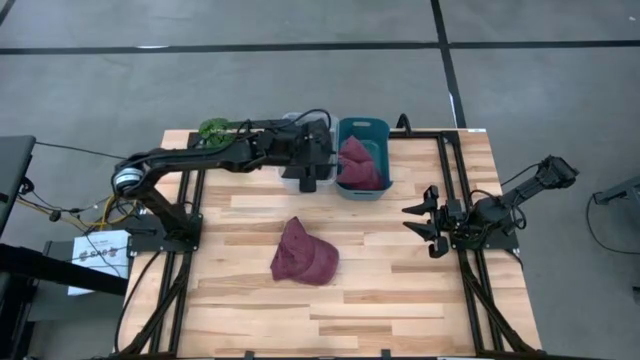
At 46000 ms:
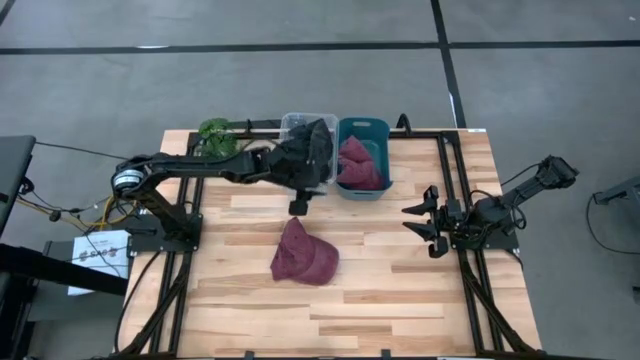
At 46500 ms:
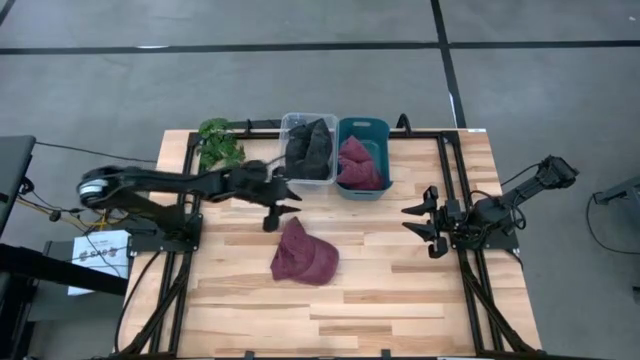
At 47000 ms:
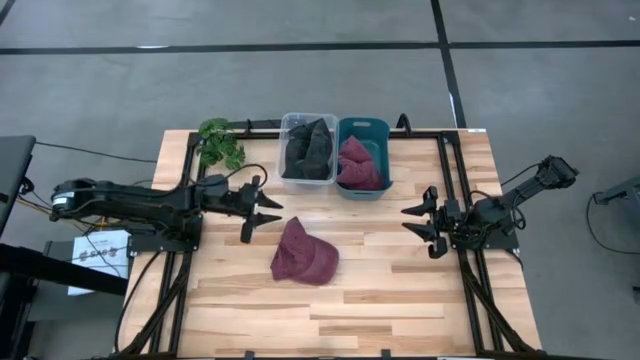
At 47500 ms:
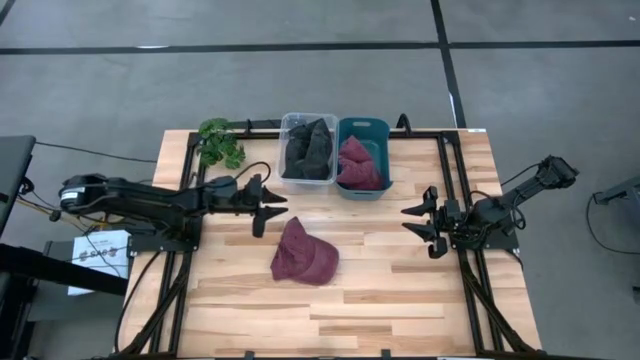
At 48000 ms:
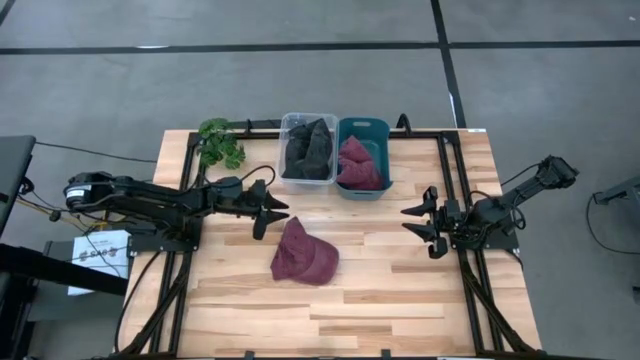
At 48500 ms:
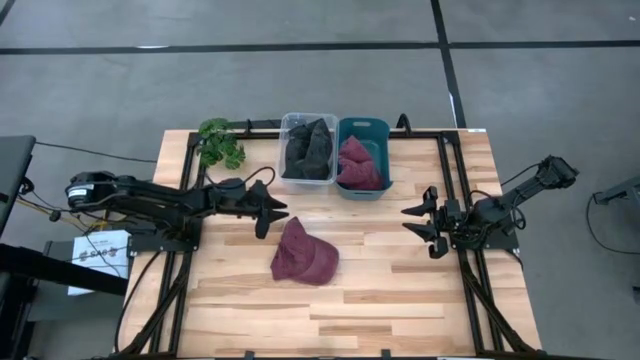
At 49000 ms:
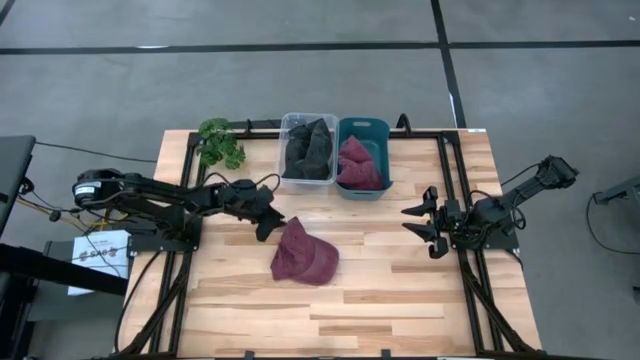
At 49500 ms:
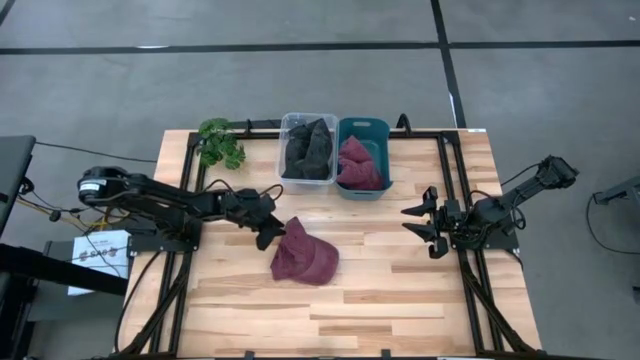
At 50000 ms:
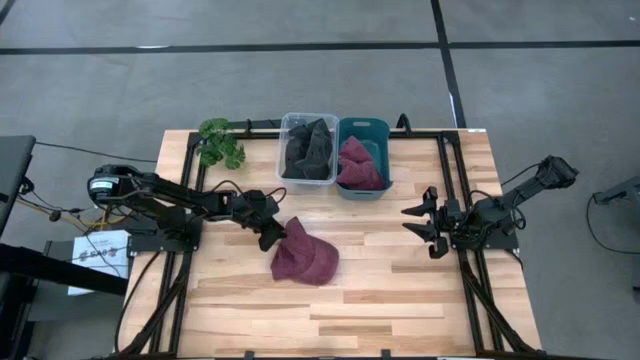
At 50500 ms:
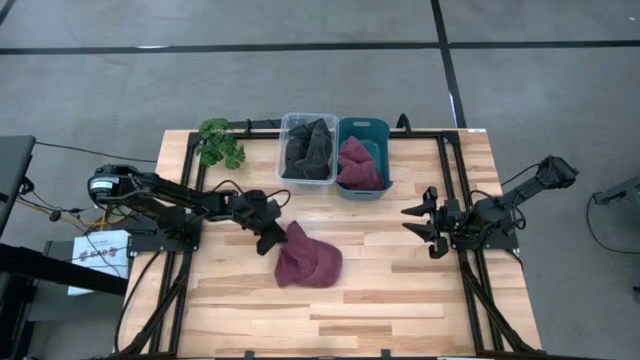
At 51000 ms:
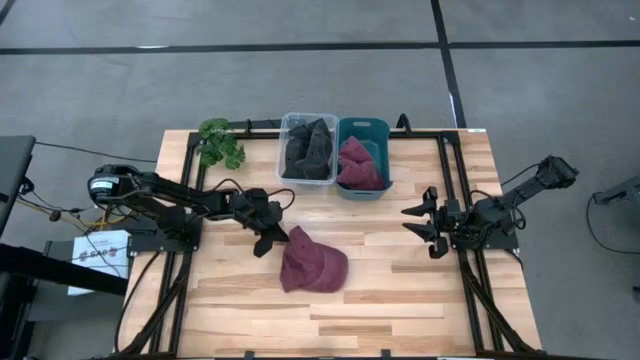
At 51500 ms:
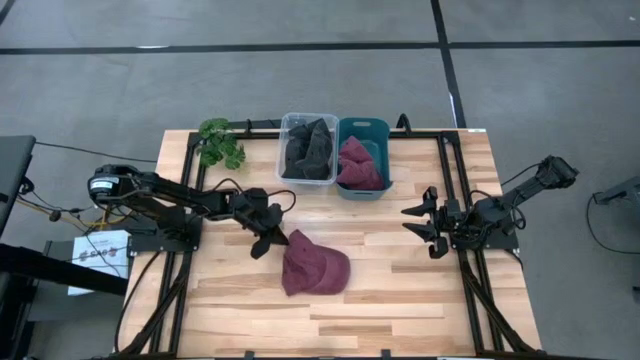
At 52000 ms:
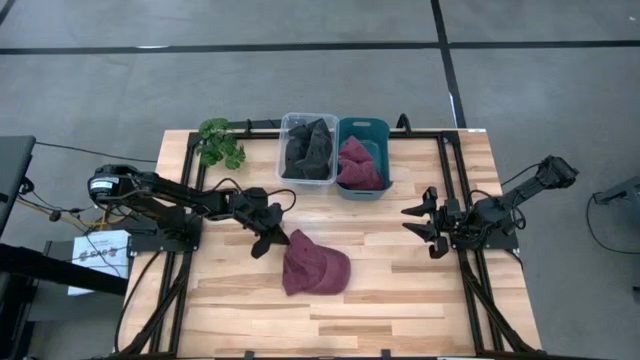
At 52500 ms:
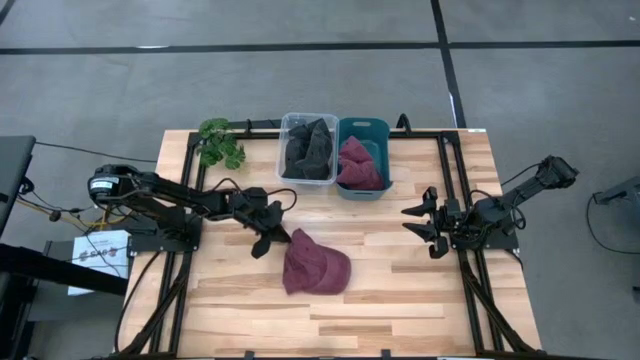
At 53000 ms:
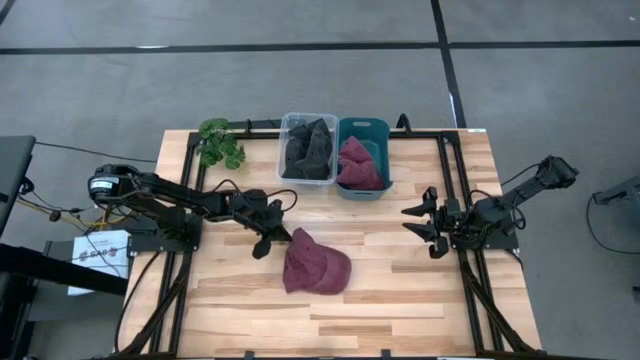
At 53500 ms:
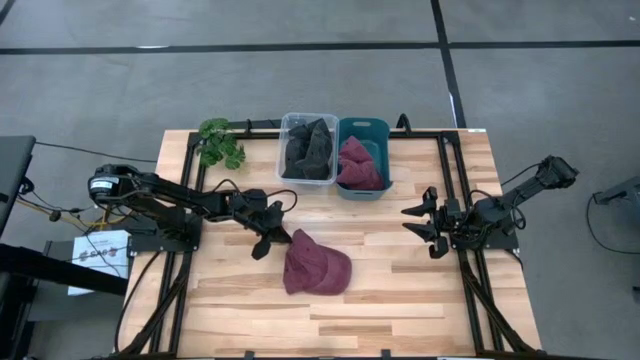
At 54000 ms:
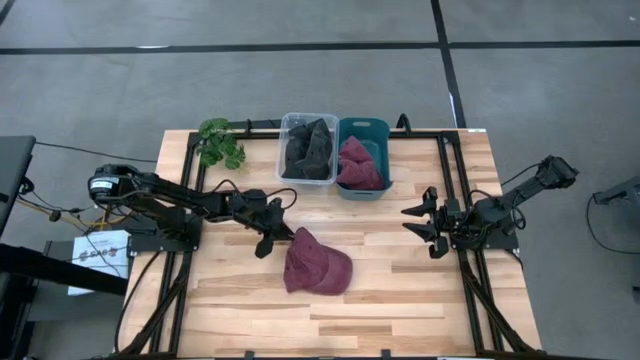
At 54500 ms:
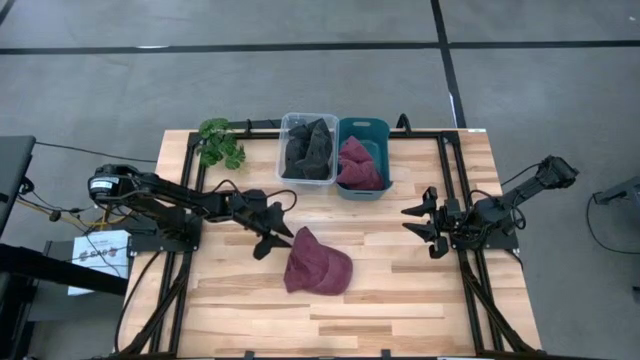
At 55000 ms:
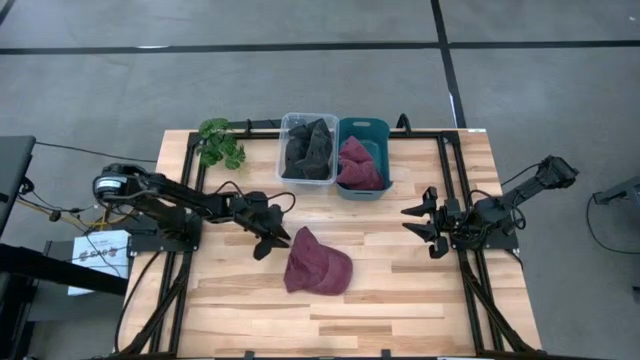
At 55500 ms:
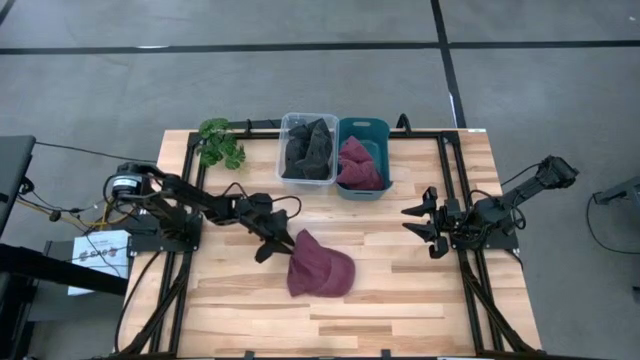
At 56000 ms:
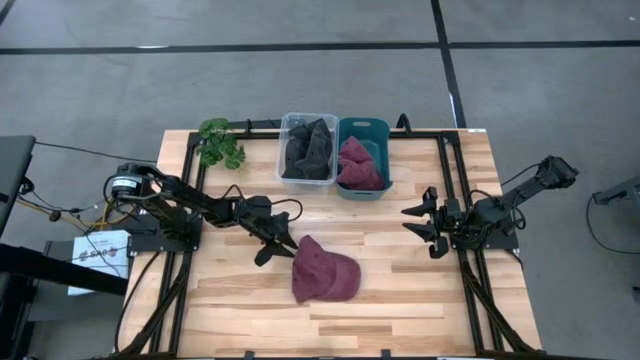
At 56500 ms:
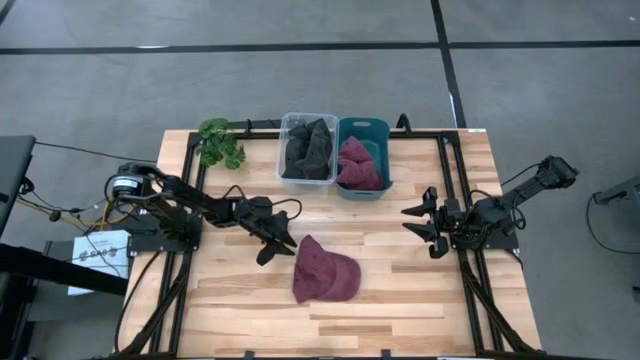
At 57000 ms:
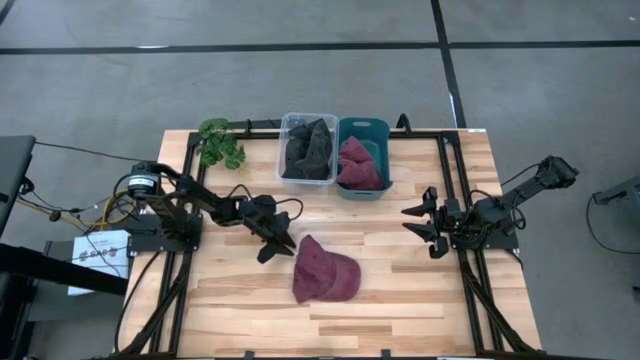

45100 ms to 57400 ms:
Task: Pick & Place hat
Put the red cap into the blue bin

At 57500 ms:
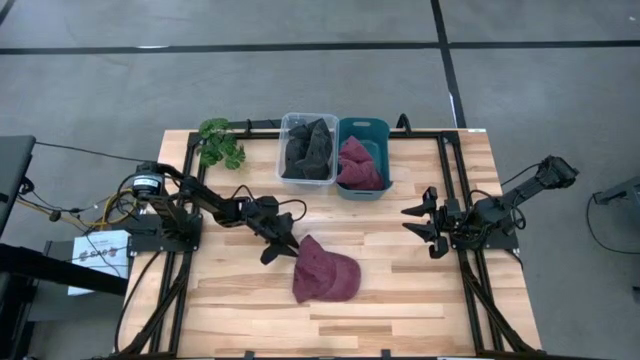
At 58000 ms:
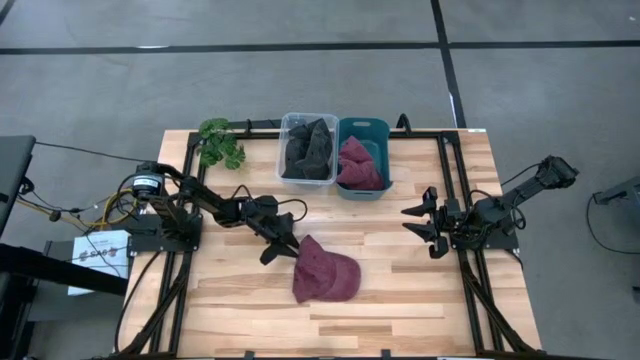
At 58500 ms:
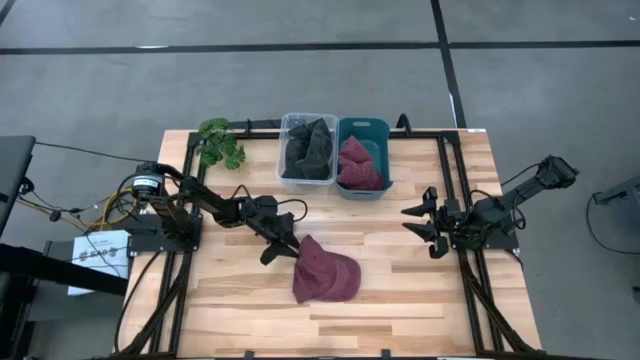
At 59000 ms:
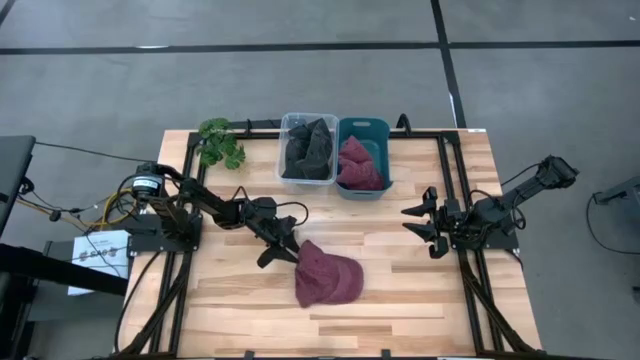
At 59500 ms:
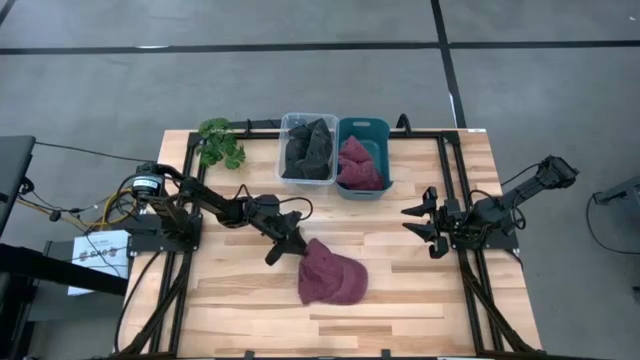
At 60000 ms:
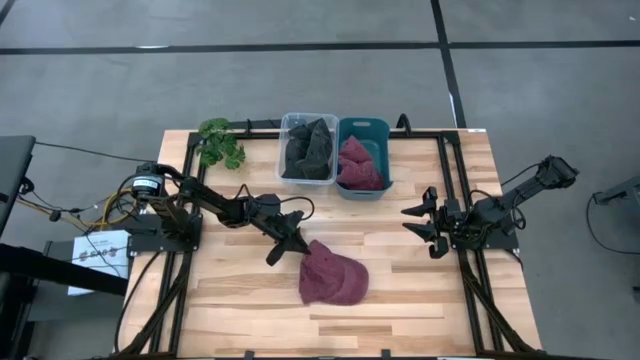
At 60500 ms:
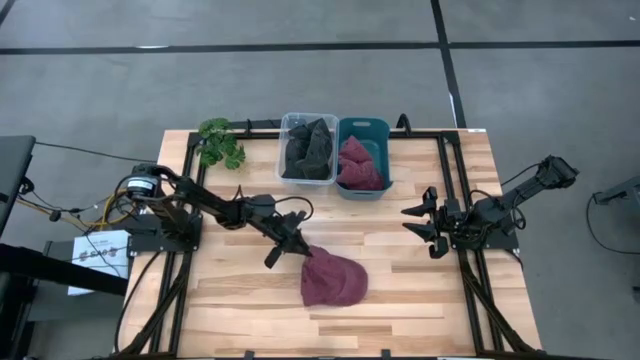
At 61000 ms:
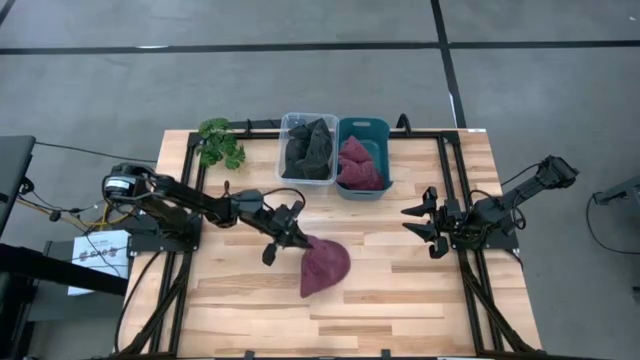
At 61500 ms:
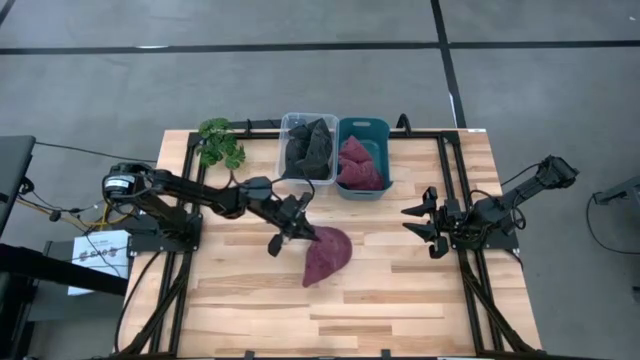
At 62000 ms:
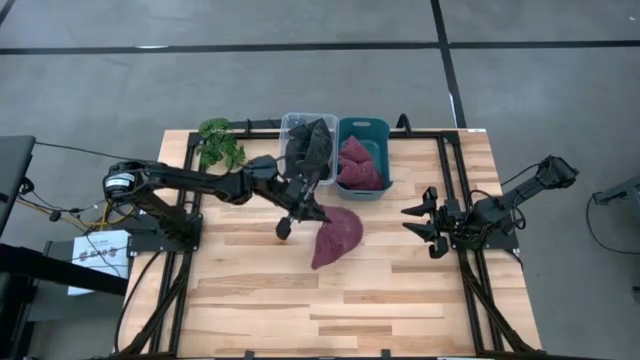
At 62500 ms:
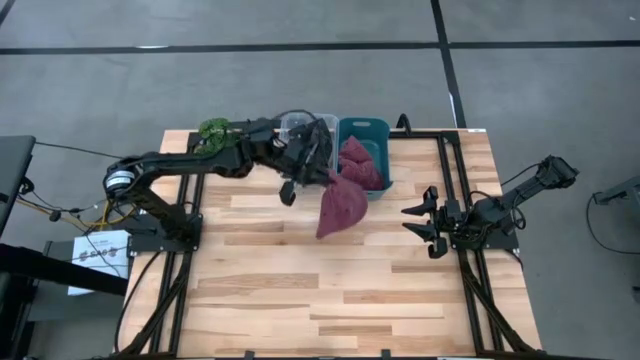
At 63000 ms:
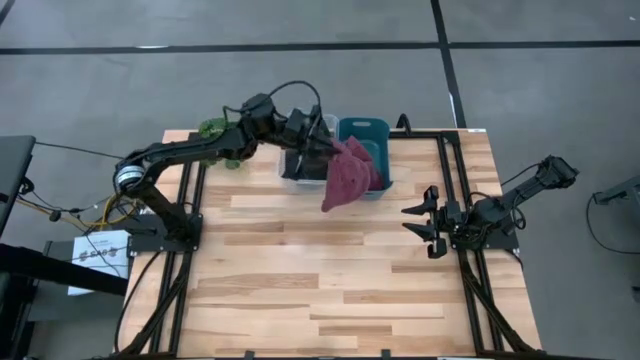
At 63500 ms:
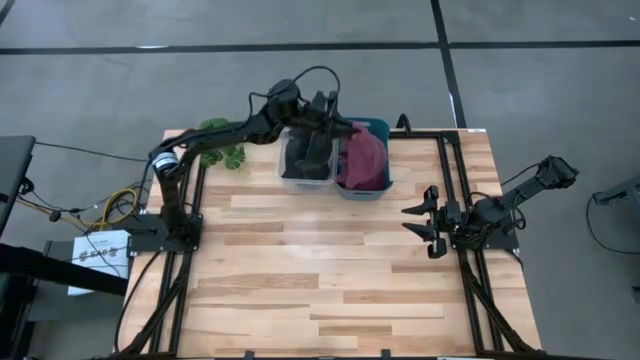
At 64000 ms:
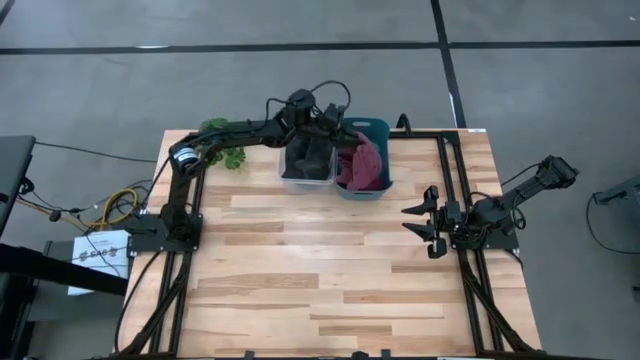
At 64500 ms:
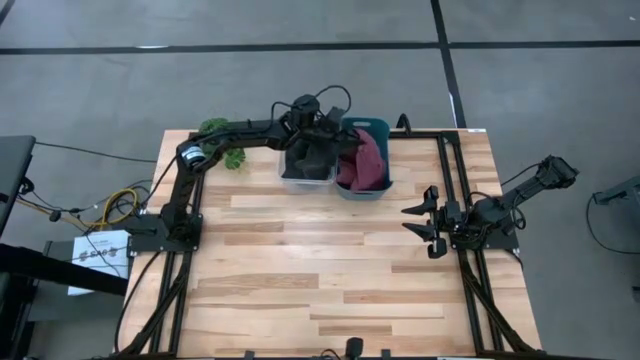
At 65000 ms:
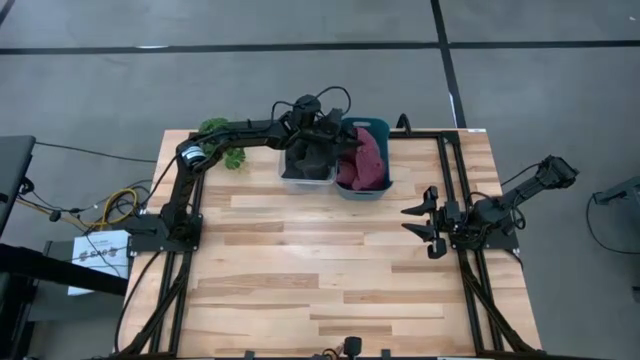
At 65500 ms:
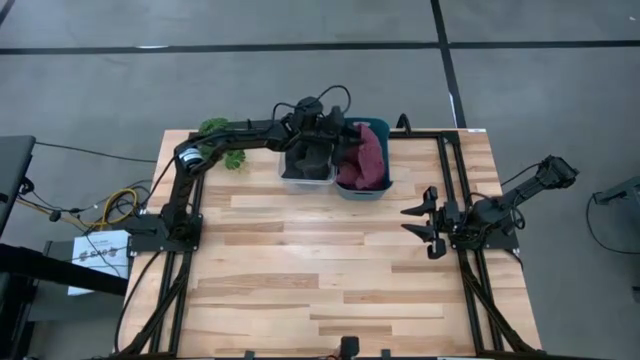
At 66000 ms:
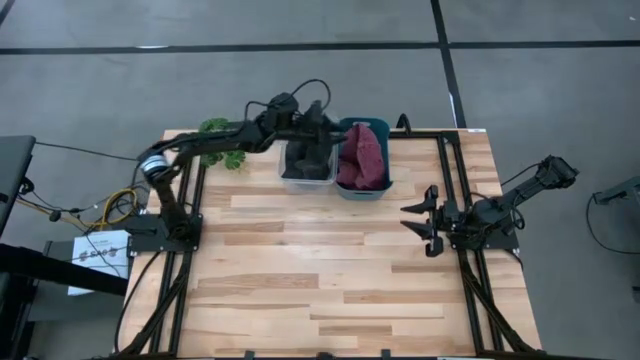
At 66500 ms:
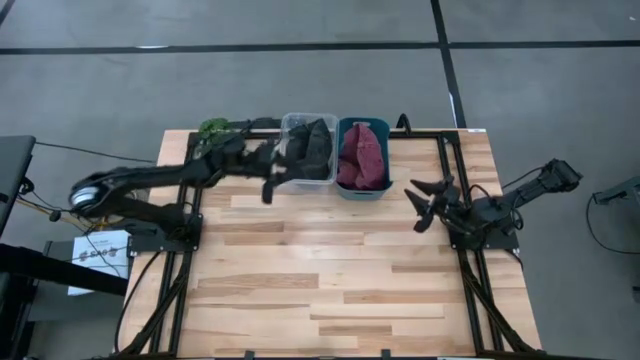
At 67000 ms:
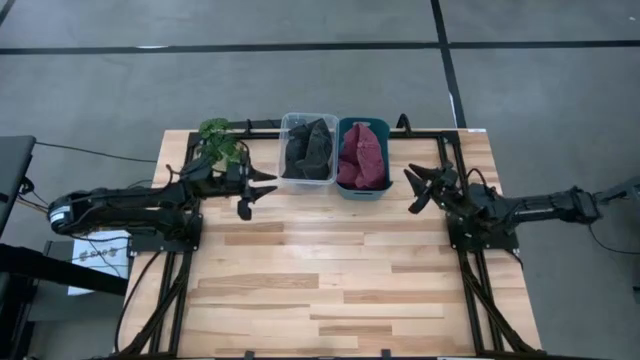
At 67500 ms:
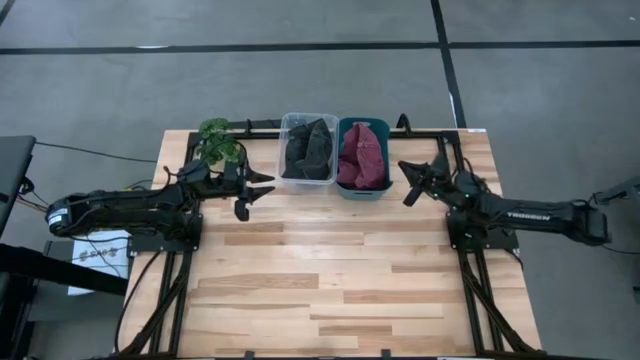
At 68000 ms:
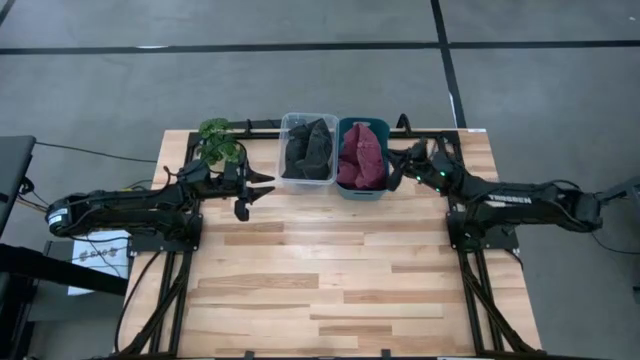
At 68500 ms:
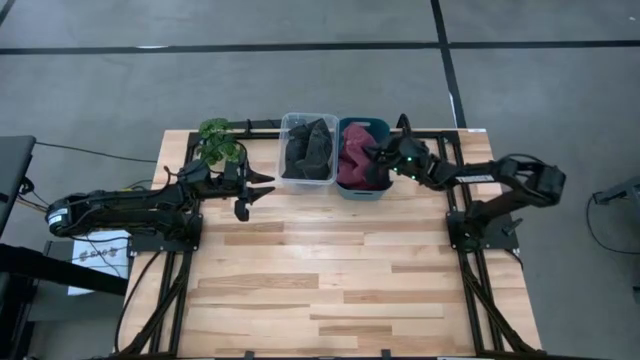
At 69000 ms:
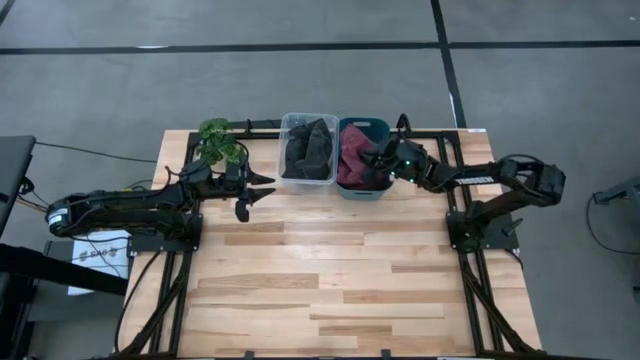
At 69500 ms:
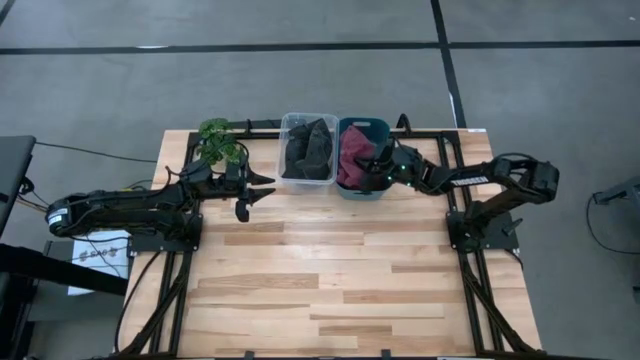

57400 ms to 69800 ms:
Put the red cap into the blue bin
